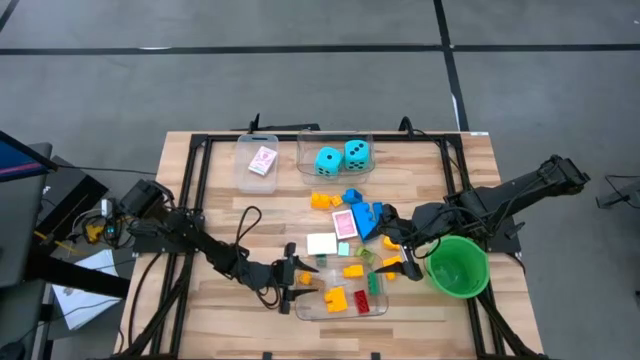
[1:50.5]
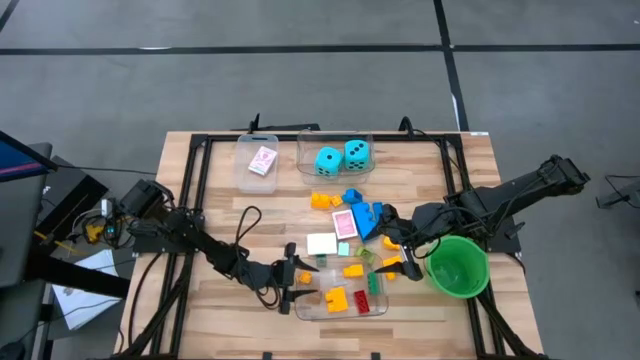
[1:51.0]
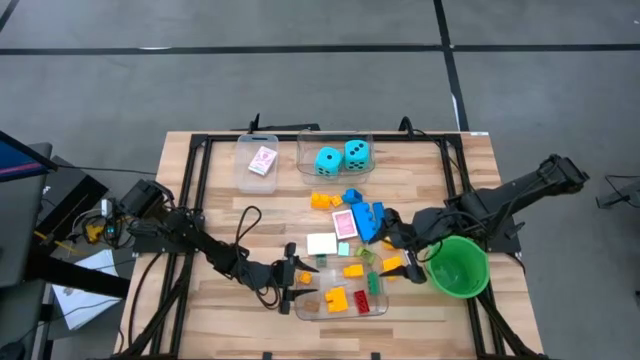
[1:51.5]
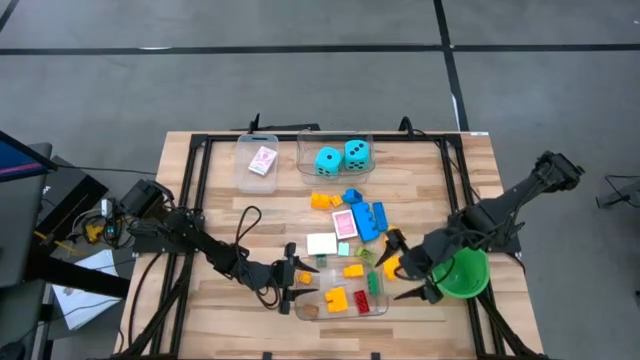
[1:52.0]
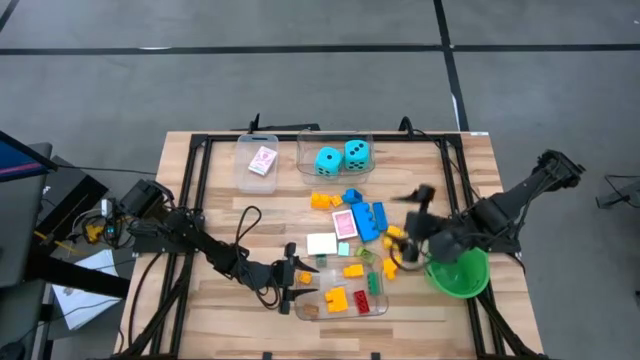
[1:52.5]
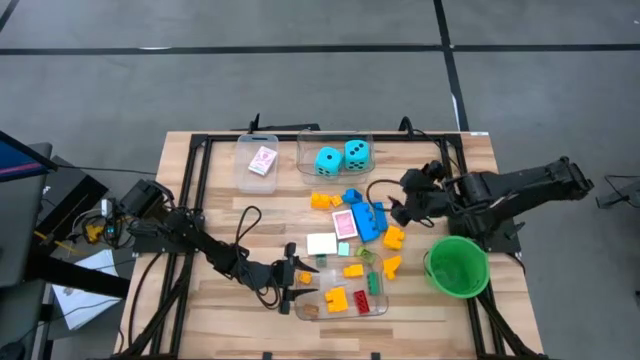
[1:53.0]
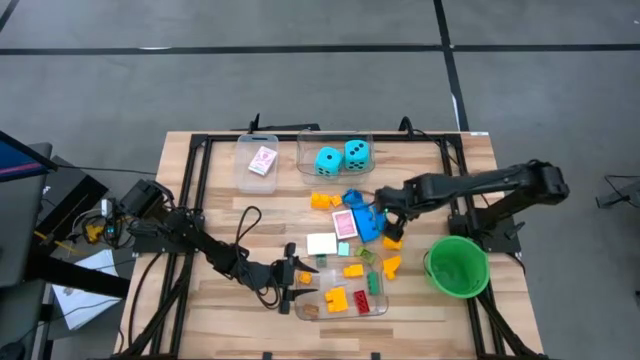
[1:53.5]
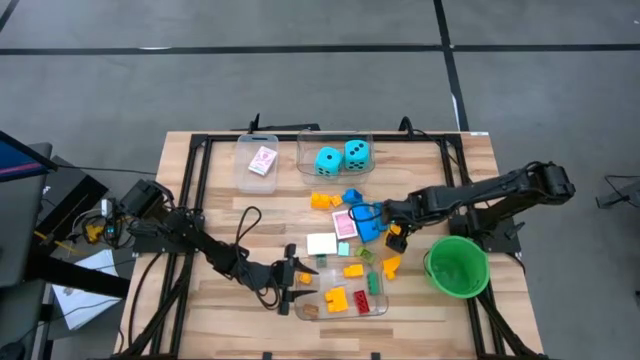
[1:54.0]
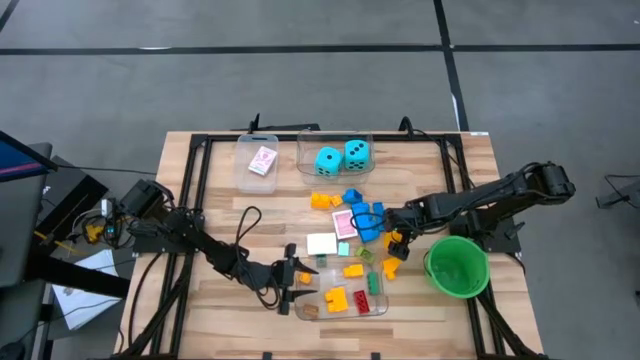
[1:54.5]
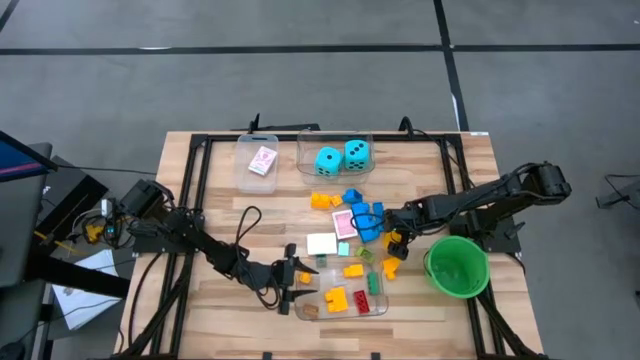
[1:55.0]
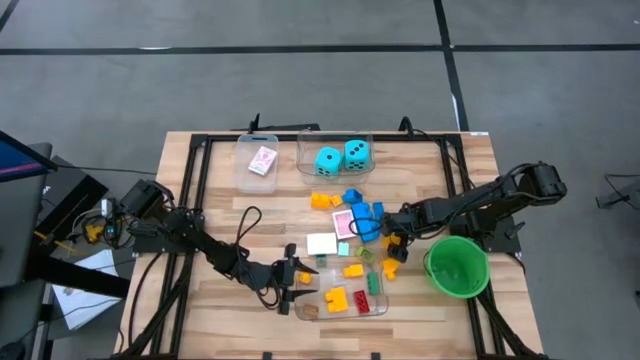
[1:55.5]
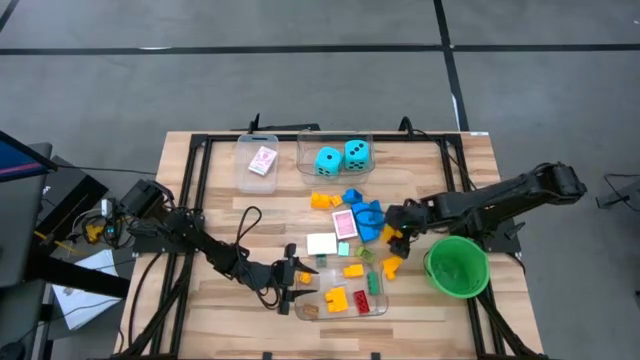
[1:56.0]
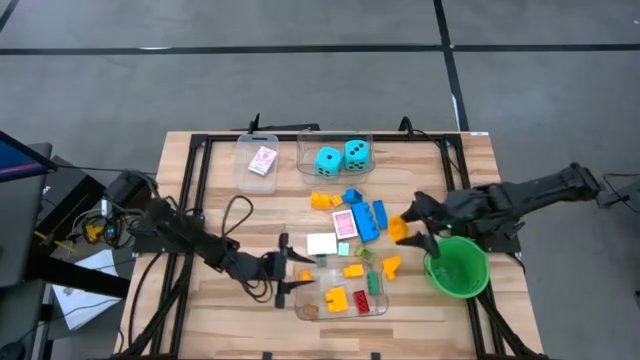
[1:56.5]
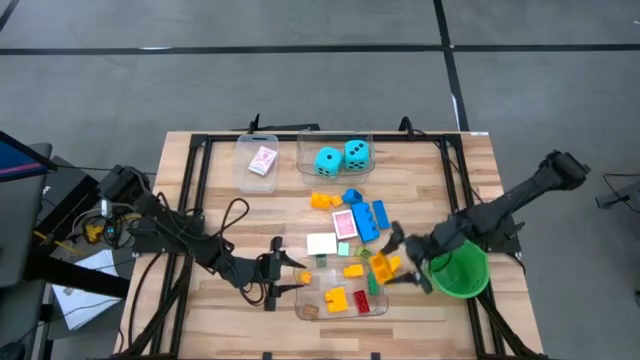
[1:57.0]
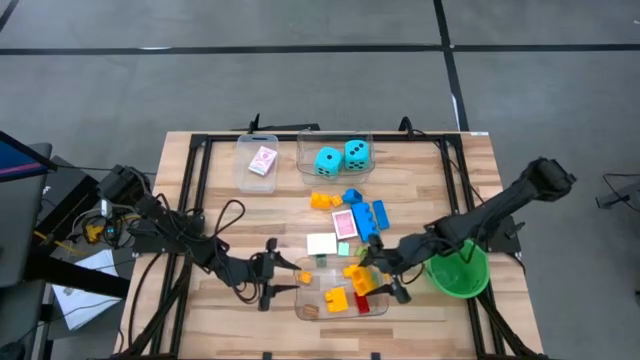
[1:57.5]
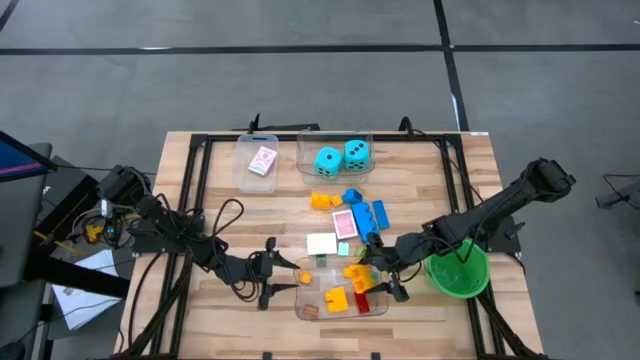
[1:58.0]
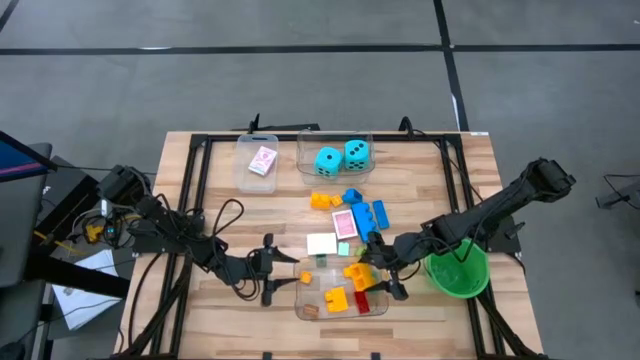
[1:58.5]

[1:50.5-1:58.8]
Task: Pick & Place Toys
Put the yellow game piece into the bottom transparent bin

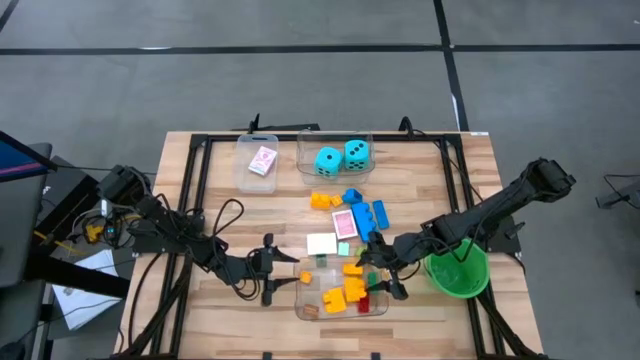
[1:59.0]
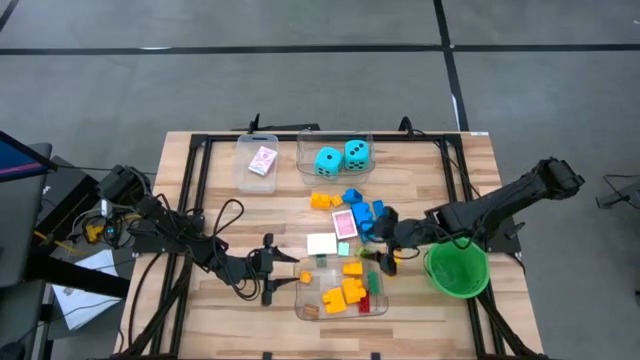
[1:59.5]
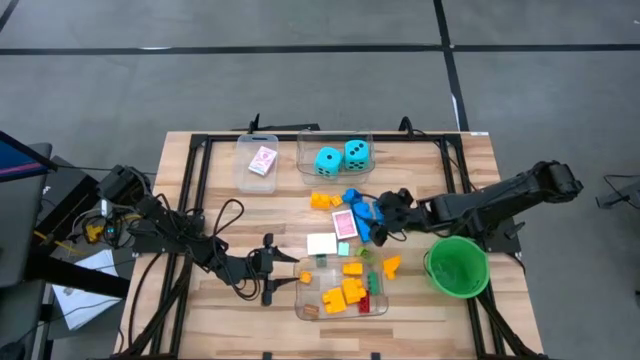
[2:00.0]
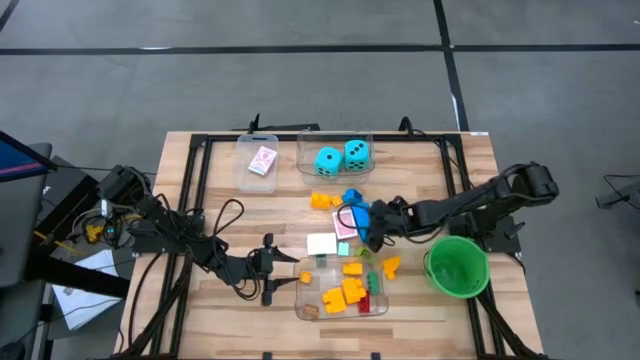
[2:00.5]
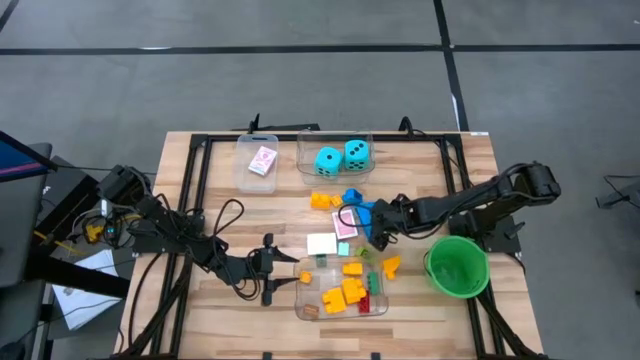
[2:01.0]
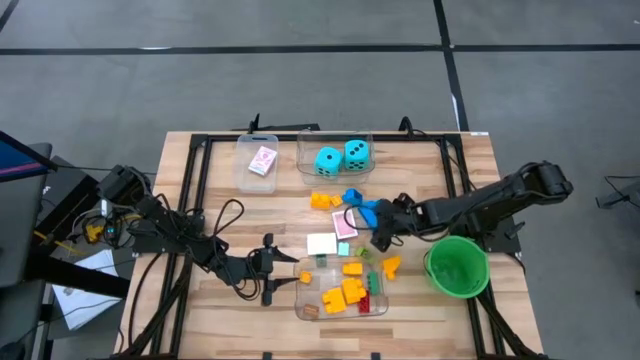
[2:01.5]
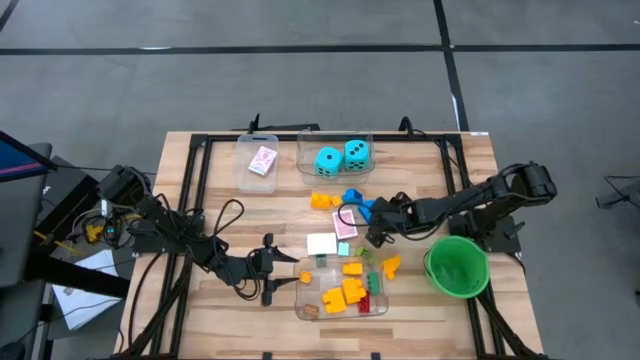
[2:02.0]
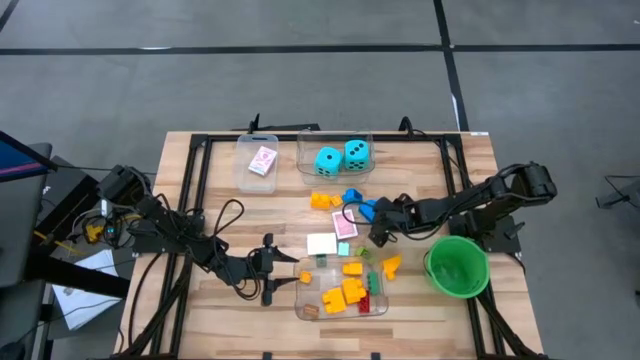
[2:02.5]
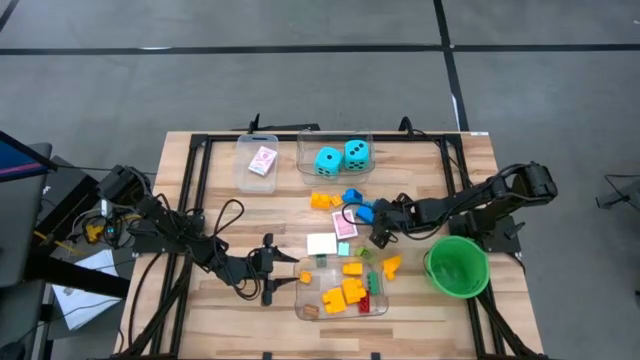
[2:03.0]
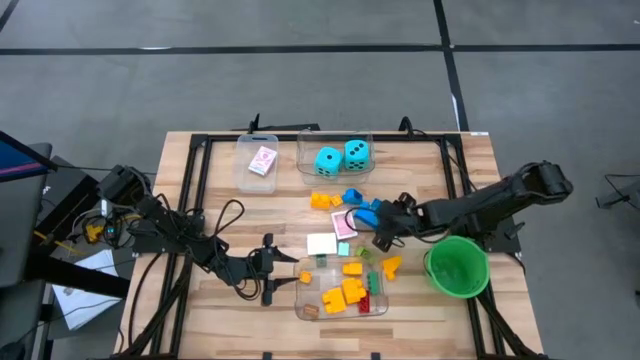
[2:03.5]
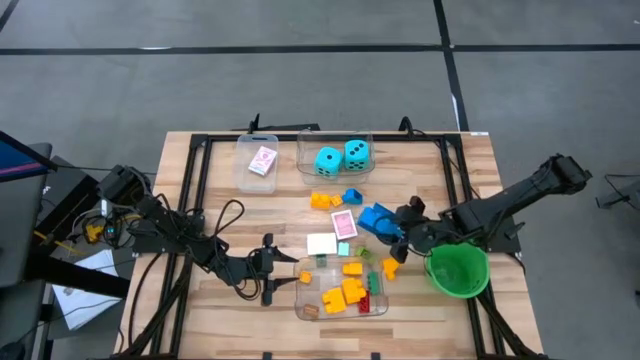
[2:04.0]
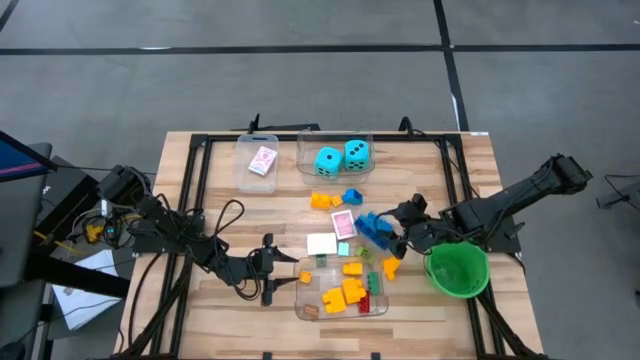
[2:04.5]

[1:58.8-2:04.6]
Put the blue game piece into the bottom transparent bin

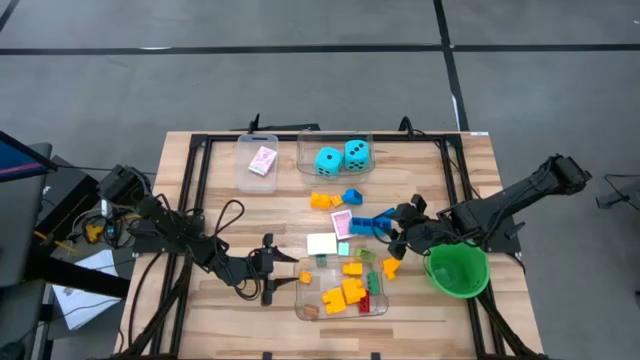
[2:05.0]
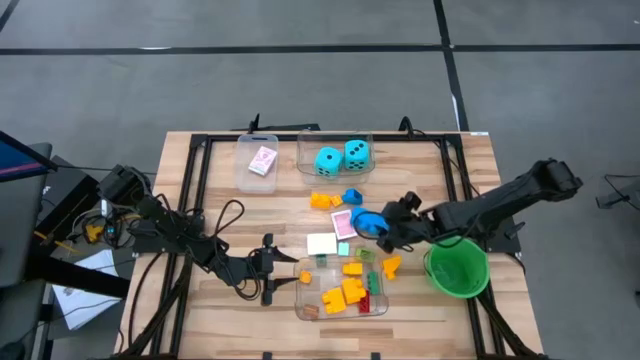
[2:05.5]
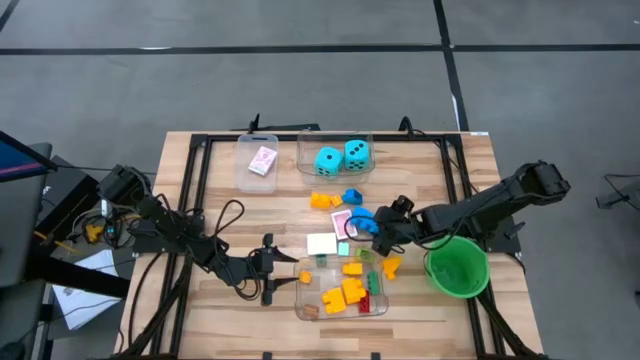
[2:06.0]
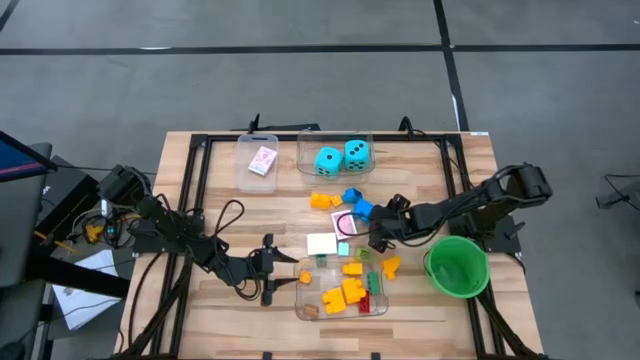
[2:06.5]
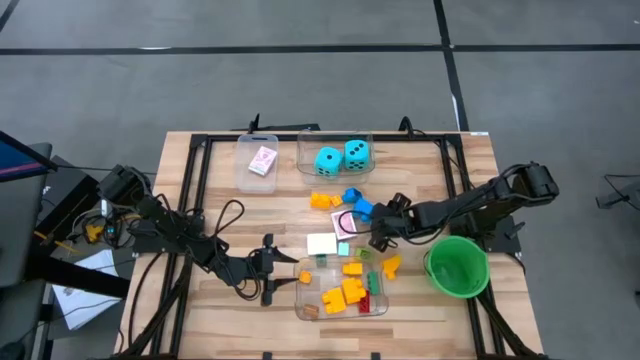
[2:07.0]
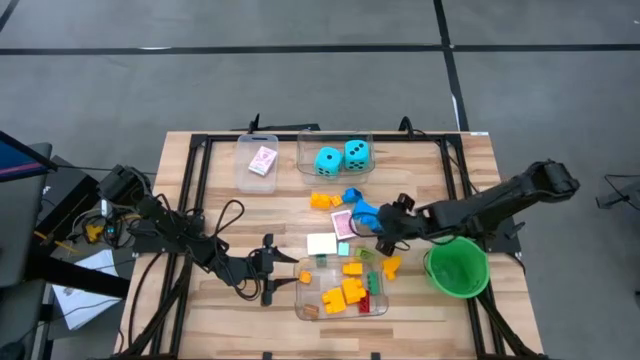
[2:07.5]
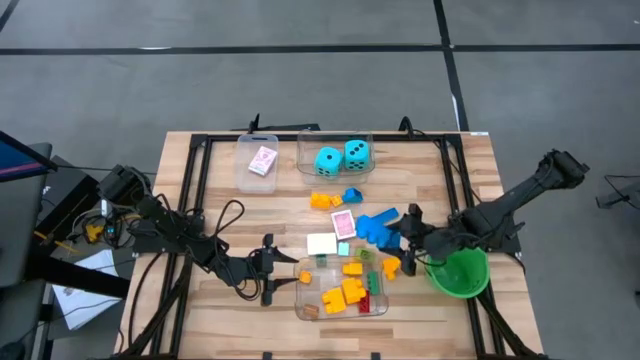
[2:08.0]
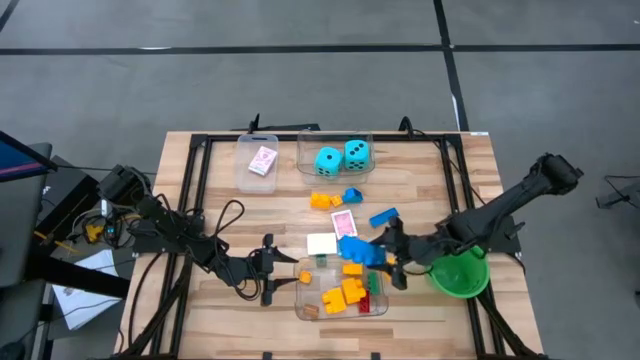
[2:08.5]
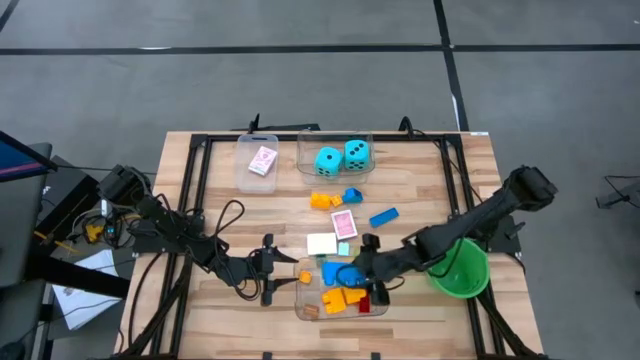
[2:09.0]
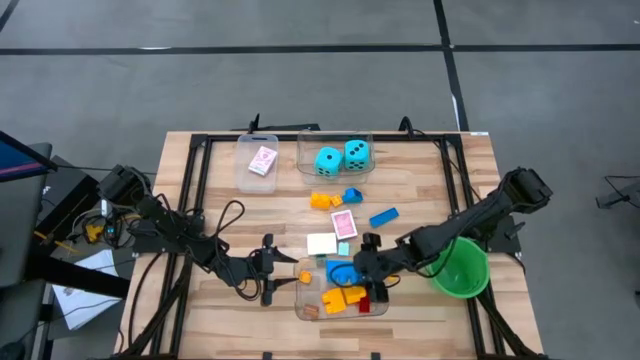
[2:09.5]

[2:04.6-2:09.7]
Put the blue game piece into the bottom transparent bin

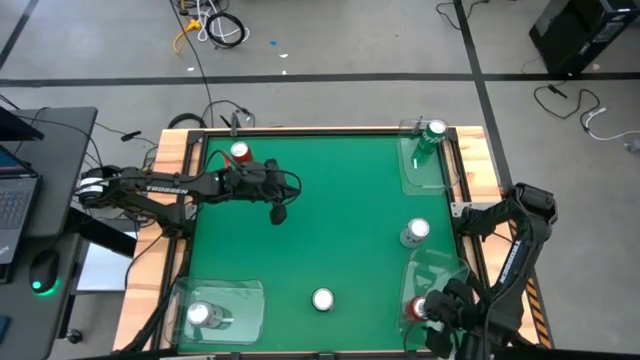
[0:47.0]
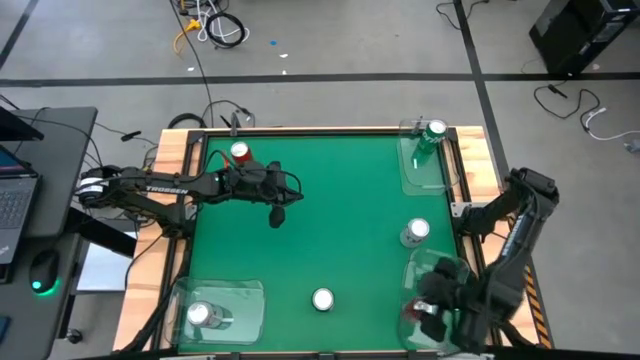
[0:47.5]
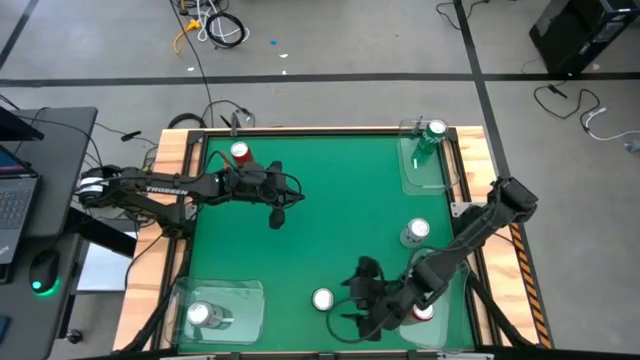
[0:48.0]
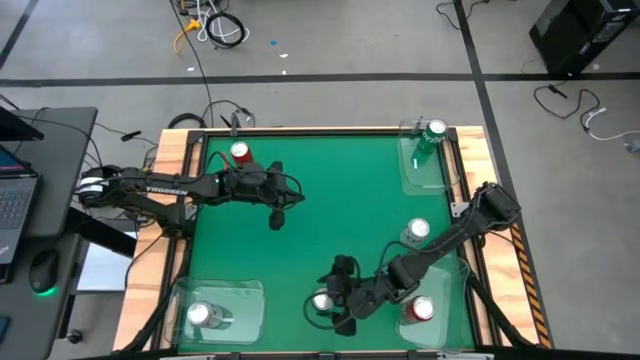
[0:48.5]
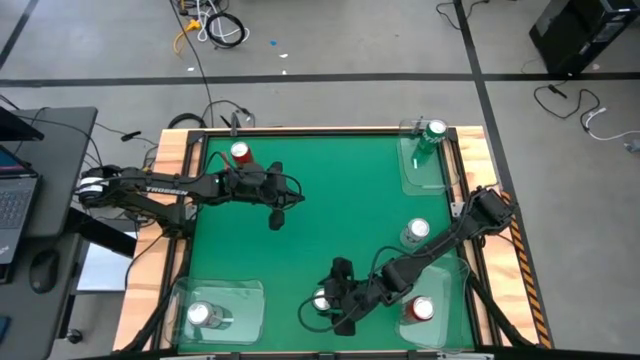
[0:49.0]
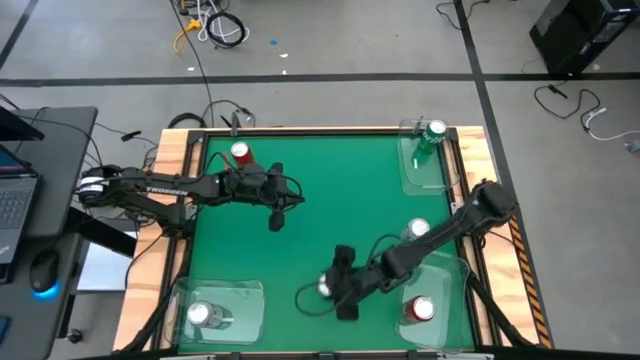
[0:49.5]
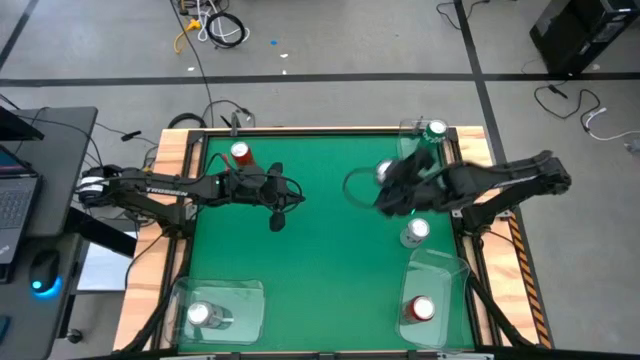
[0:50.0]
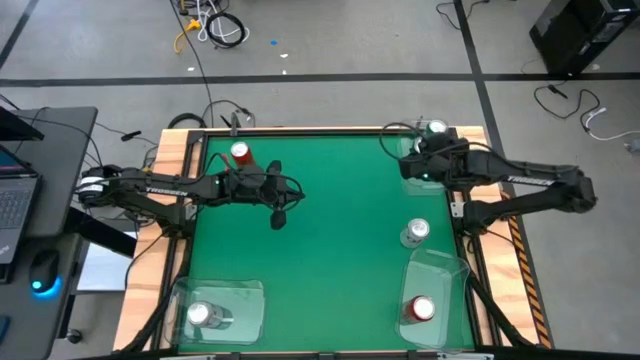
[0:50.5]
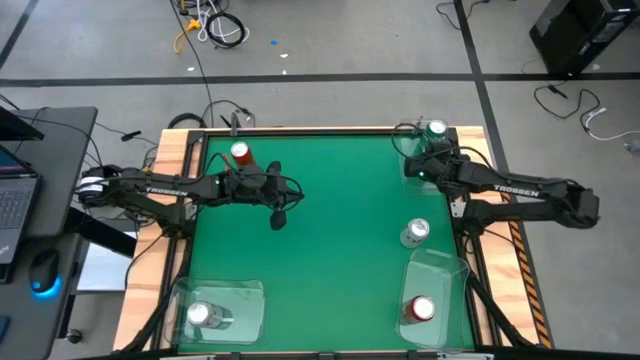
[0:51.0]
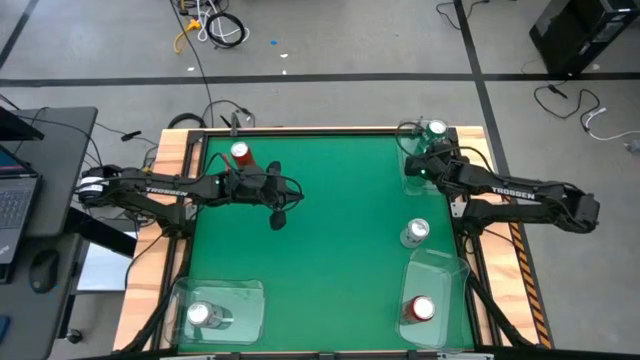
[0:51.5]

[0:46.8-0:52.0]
Task: Sort soda cans
Put the green soda can into the top right transparent bin
